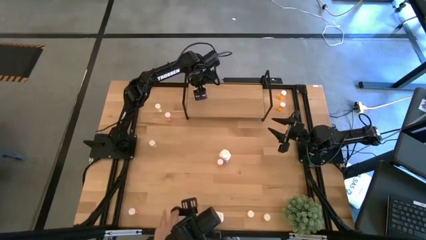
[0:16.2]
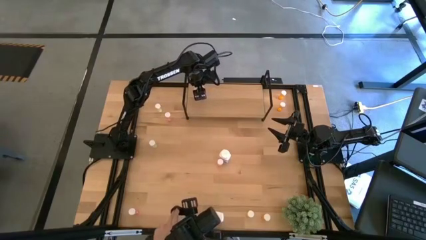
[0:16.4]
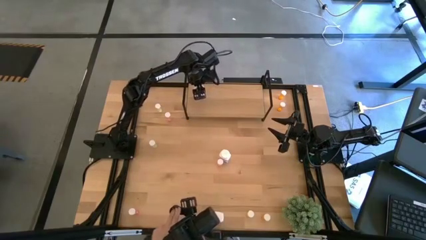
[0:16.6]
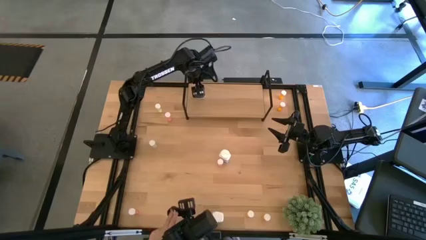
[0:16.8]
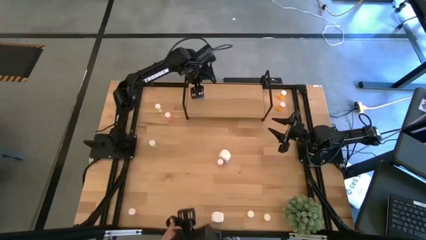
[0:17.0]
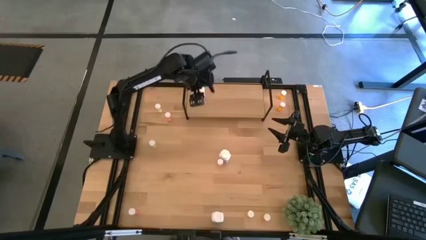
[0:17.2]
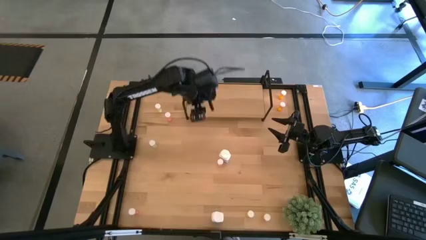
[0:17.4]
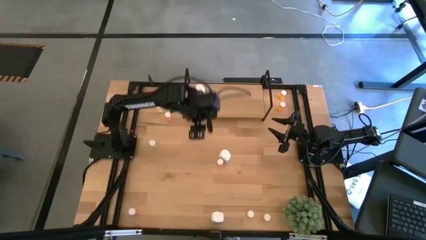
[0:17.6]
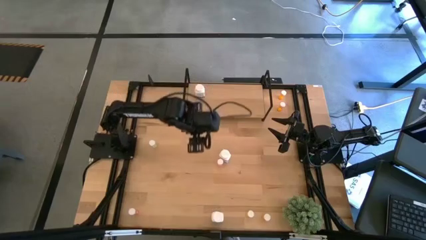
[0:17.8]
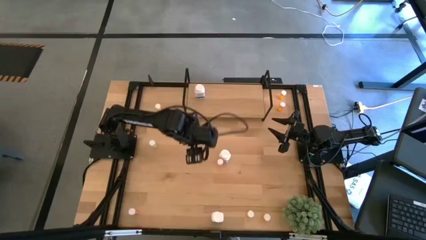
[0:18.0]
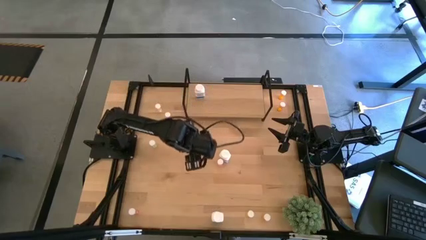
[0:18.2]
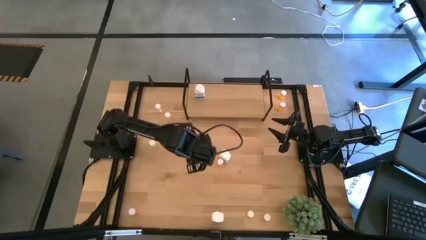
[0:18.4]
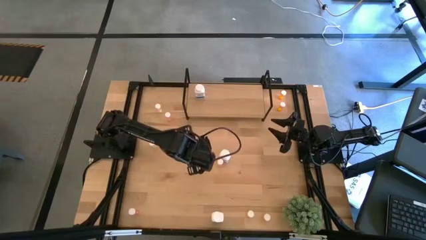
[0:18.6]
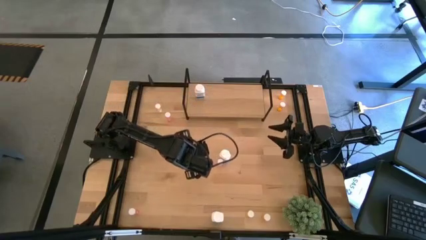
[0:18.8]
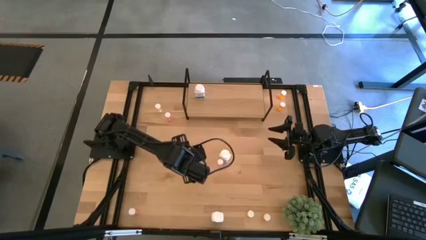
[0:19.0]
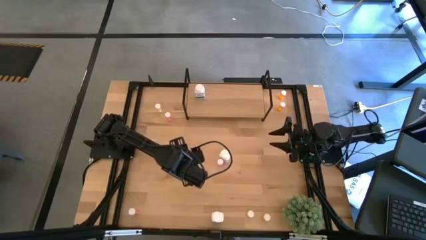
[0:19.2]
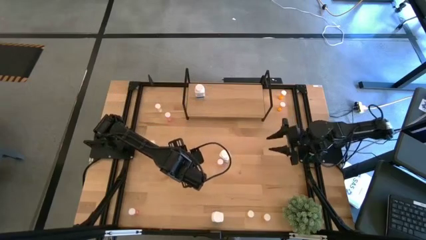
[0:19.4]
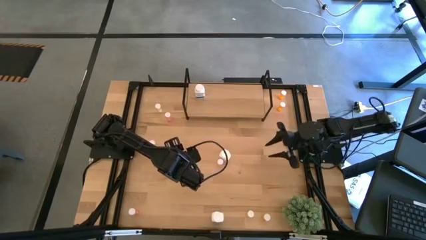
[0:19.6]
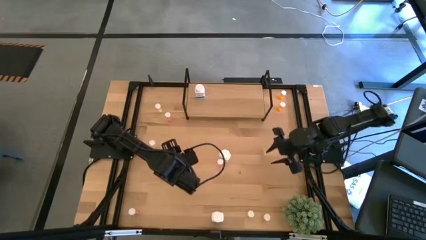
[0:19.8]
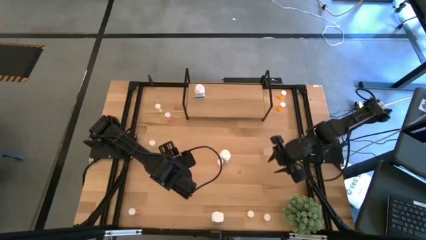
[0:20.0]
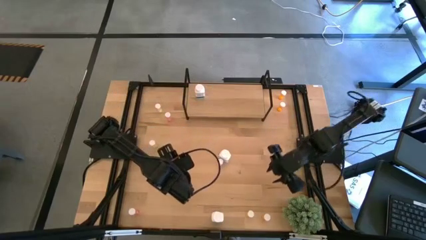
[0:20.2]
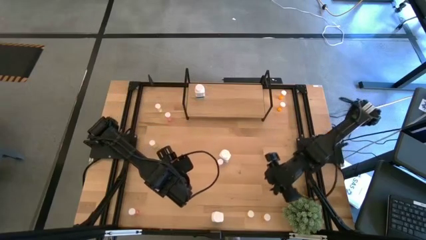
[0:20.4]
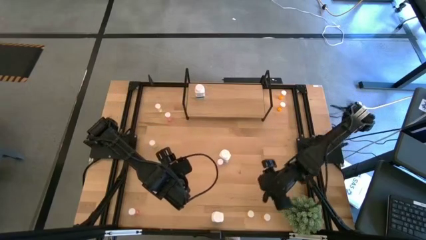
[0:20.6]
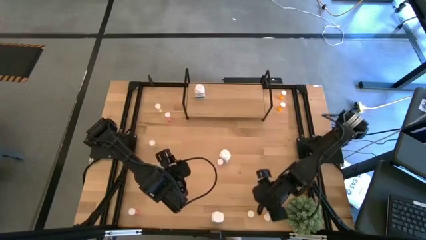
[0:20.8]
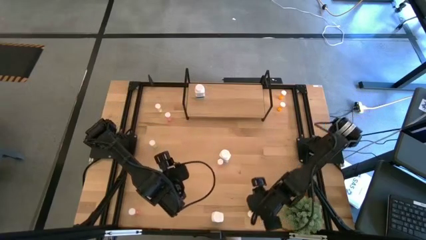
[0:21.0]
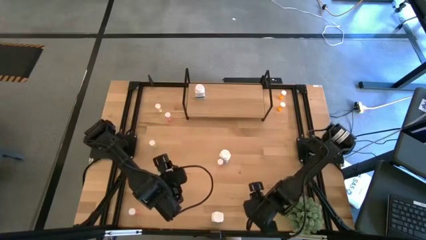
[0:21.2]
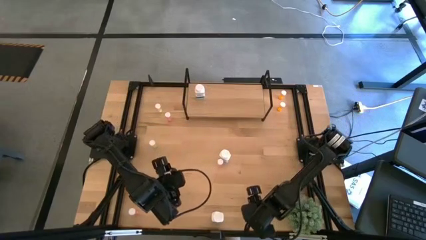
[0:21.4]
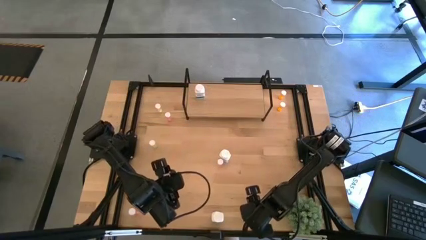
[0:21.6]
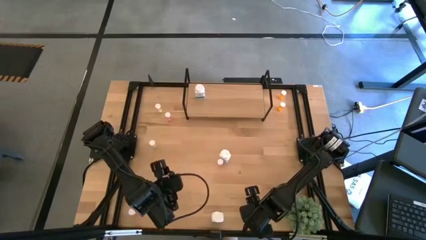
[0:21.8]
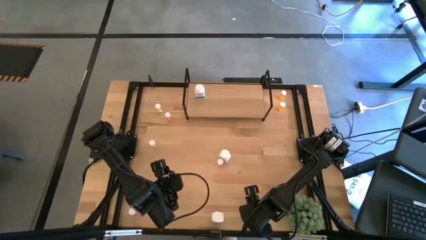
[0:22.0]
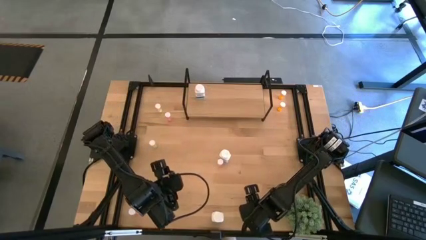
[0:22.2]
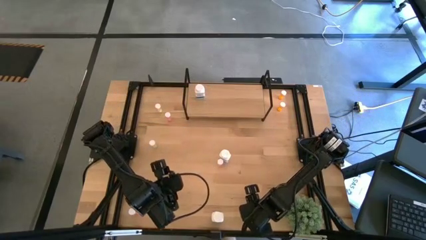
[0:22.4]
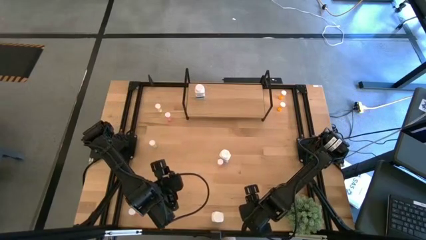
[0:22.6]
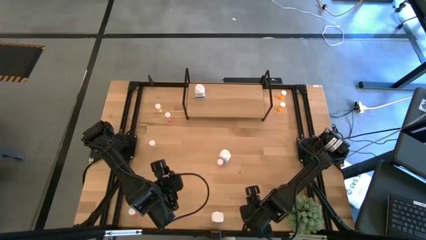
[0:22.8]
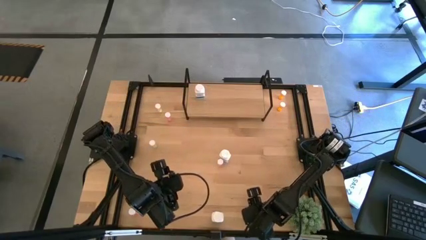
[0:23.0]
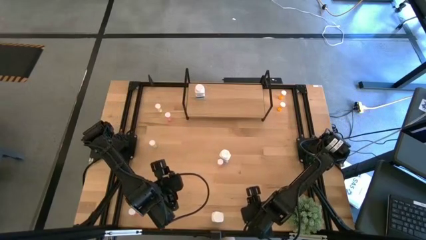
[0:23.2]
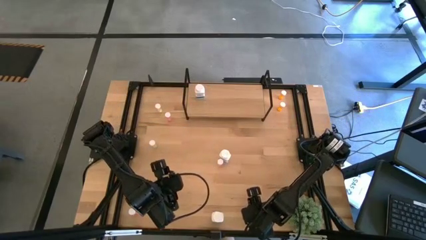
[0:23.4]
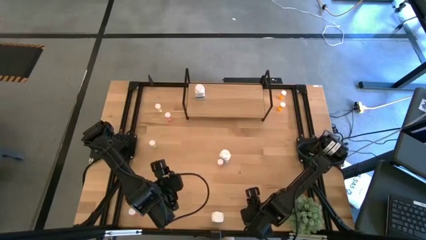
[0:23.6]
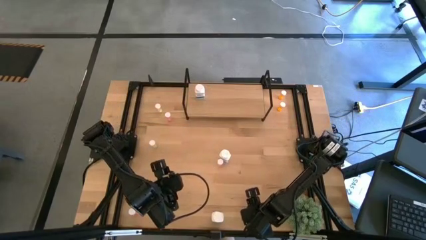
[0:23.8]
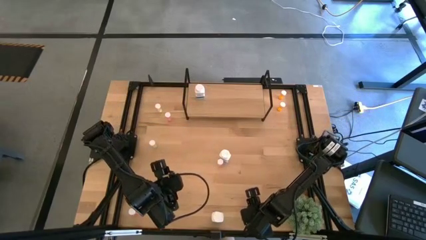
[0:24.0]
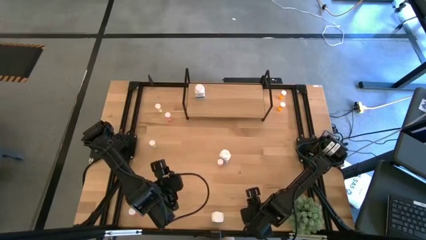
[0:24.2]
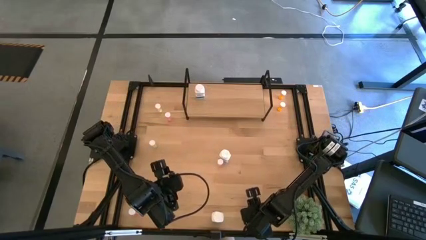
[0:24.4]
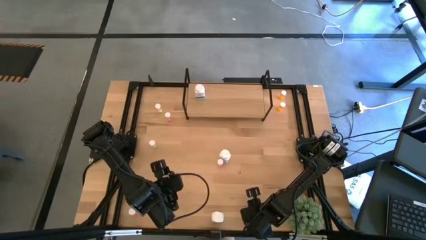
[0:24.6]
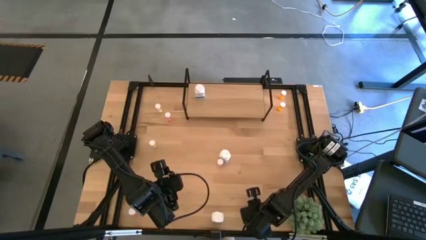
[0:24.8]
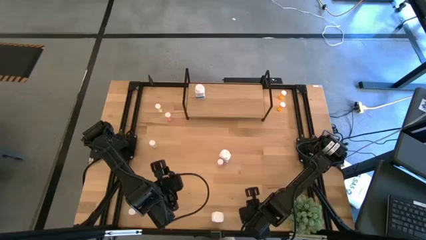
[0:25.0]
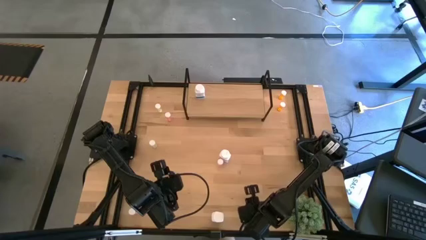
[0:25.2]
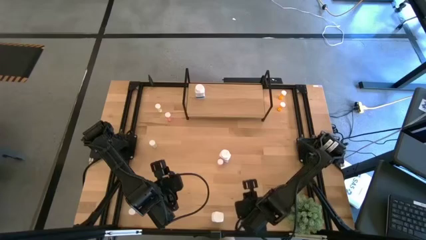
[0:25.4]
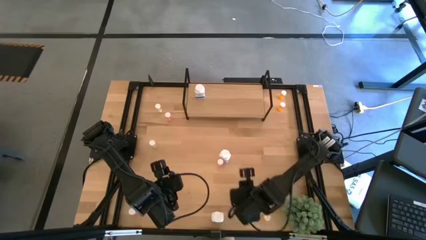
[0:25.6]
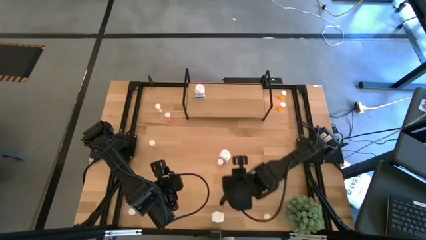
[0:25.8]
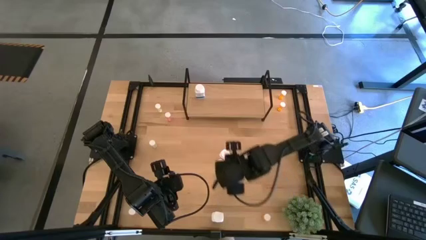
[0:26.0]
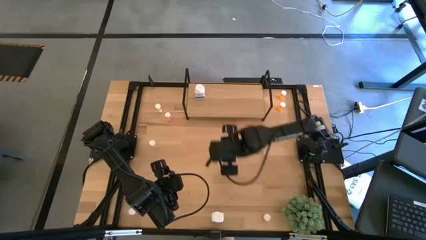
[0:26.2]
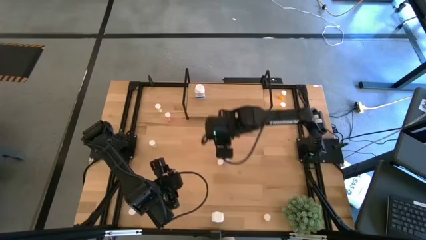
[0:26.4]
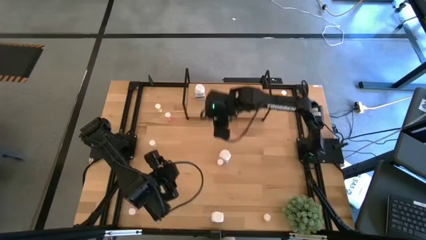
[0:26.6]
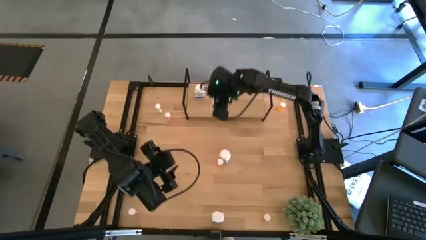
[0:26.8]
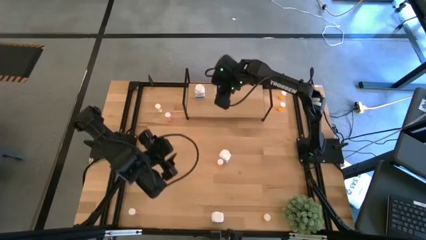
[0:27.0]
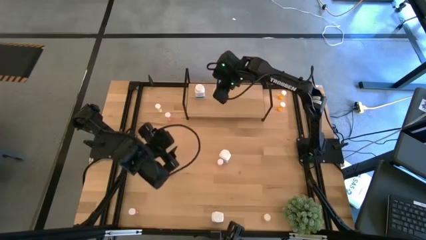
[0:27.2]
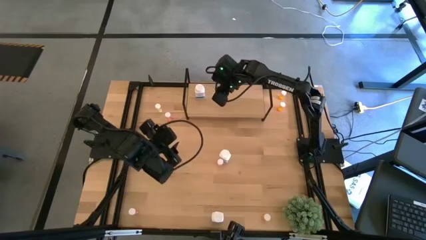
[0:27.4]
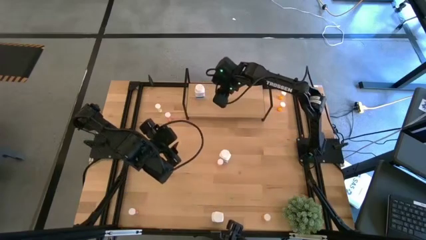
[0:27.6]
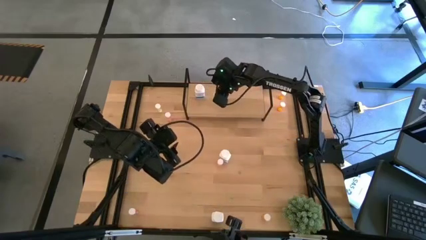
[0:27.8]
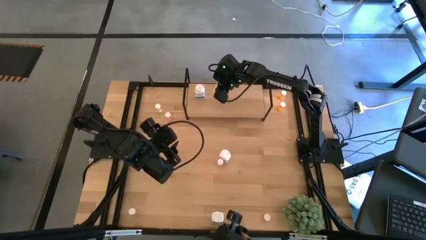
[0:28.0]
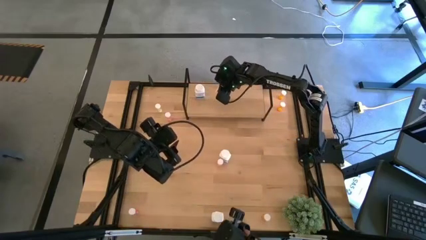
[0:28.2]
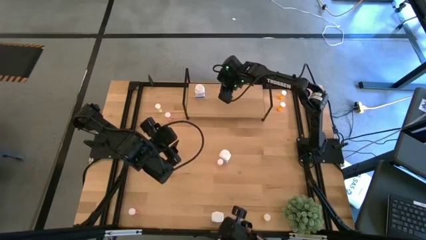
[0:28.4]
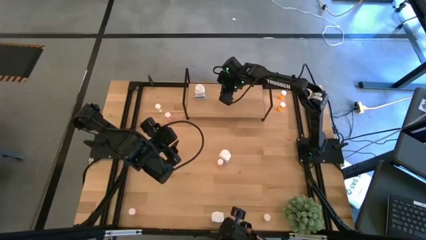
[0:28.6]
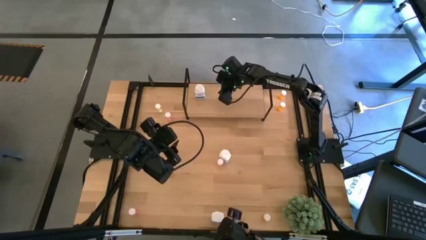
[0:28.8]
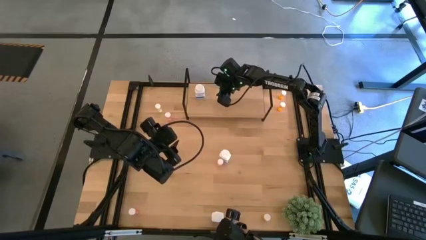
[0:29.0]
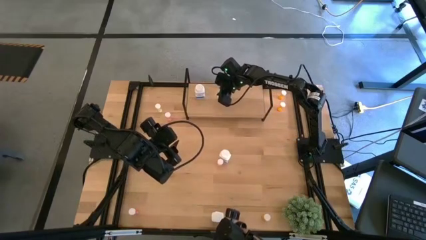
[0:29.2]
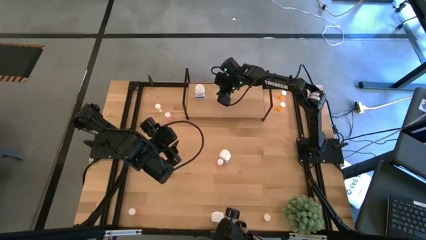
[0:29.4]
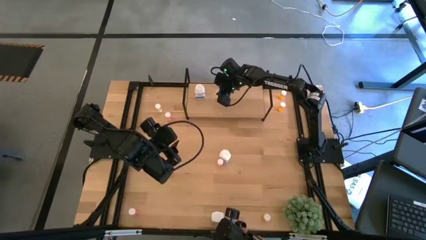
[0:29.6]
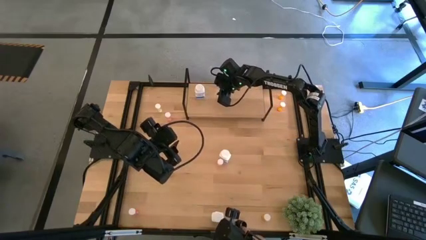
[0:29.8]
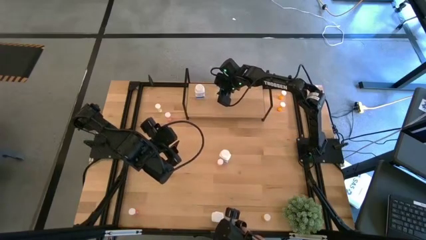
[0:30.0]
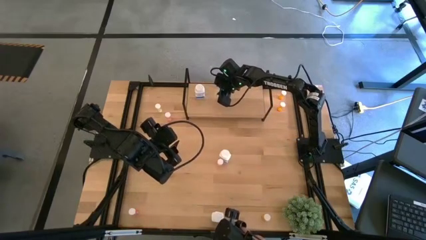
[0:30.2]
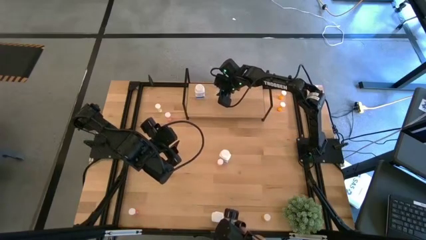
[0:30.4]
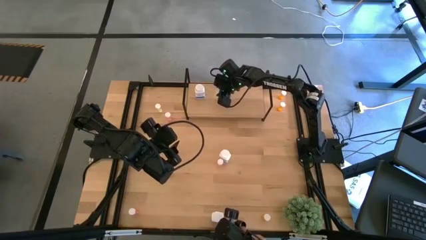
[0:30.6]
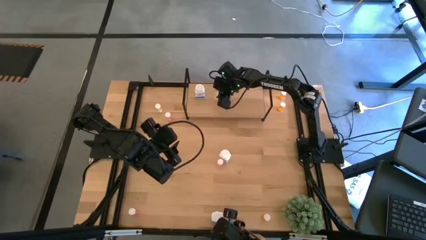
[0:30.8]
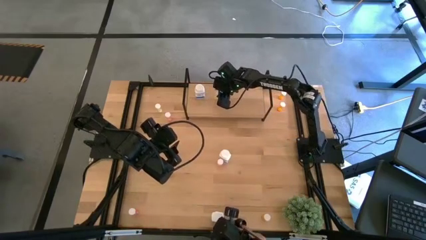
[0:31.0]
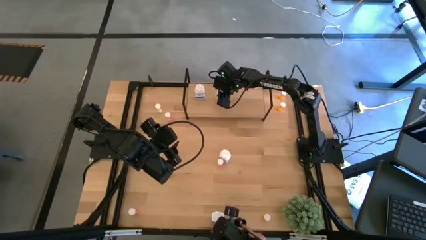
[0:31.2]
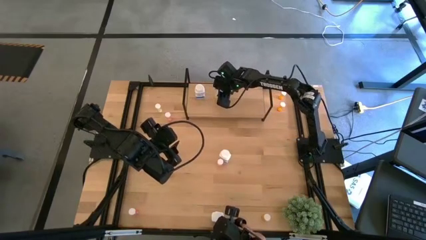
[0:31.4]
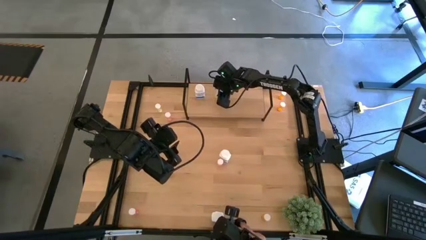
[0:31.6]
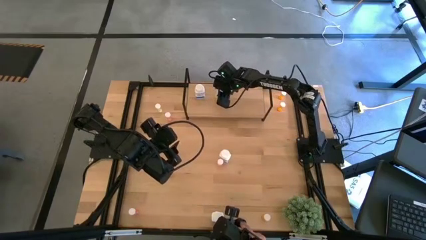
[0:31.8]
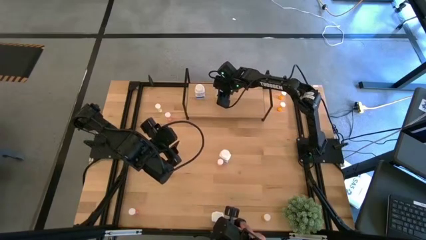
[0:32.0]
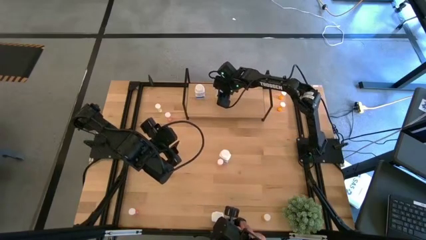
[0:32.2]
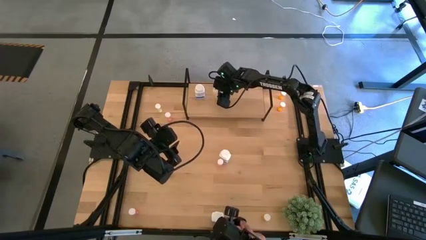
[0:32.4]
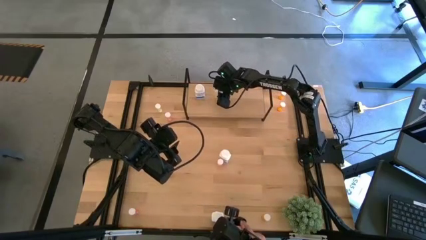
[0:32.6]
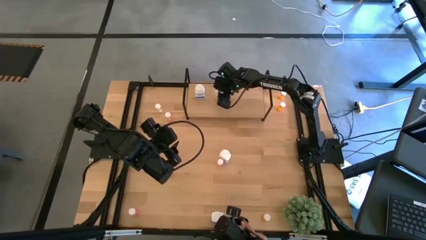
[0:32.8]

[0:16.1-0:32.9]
Task: Pick and place medicine bottles onto shelf by color
Put the bottom yellow pill bottle on the shelf
